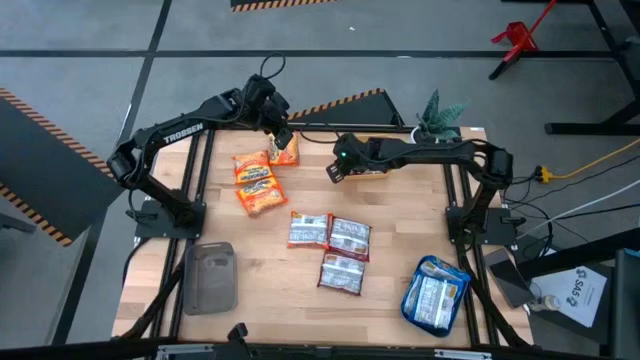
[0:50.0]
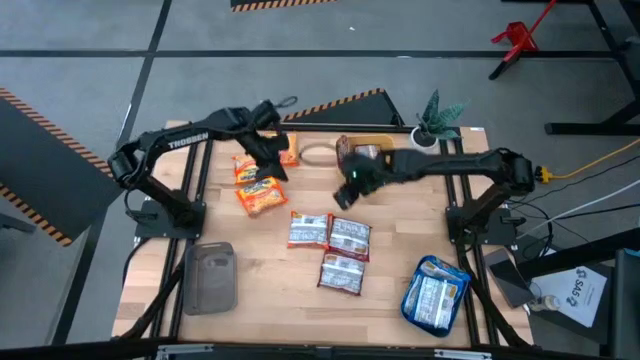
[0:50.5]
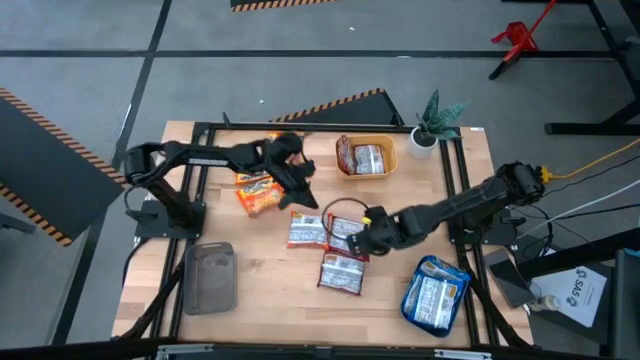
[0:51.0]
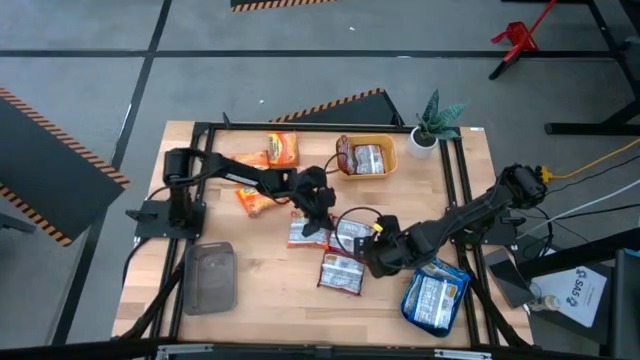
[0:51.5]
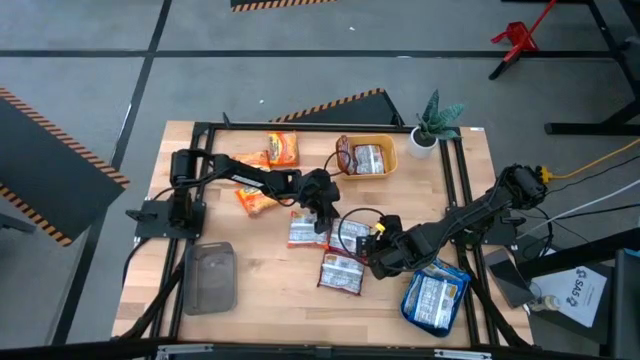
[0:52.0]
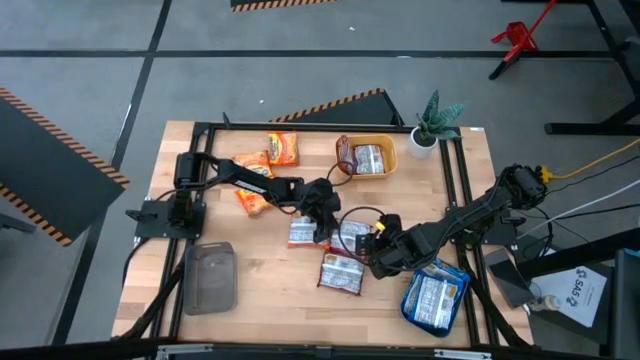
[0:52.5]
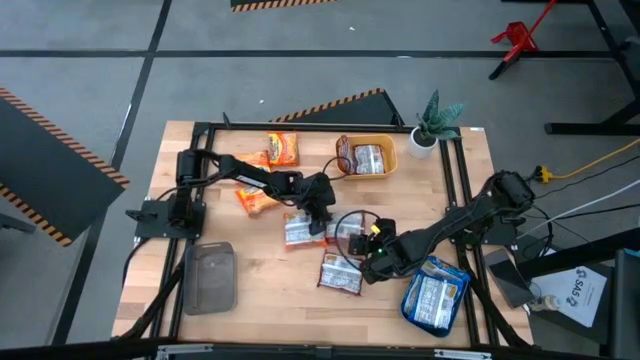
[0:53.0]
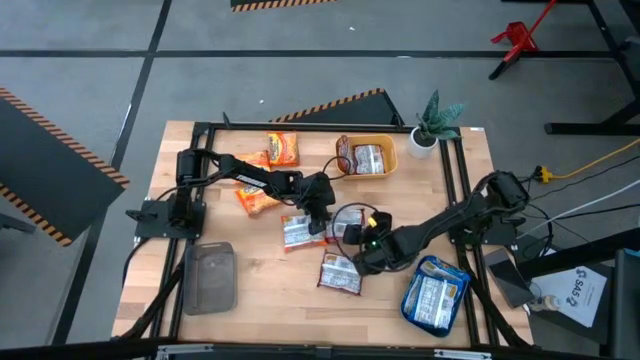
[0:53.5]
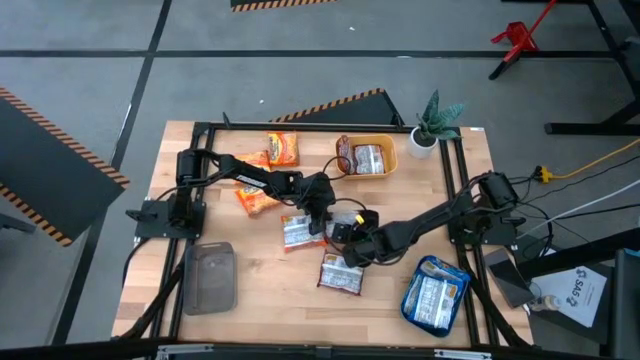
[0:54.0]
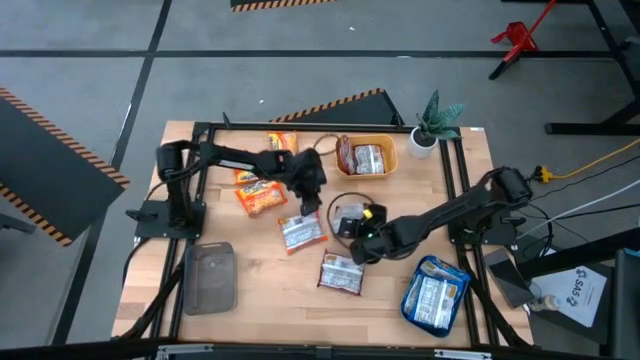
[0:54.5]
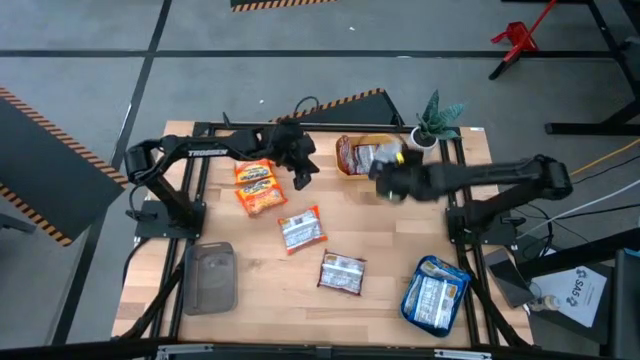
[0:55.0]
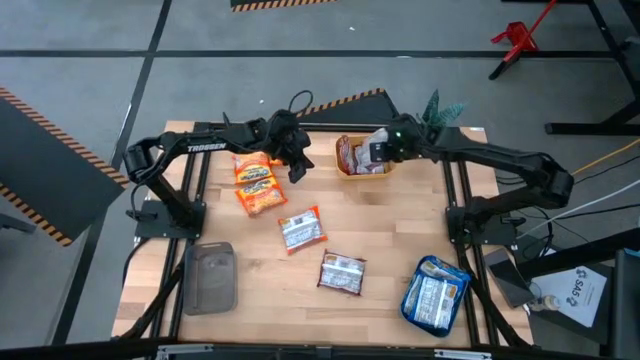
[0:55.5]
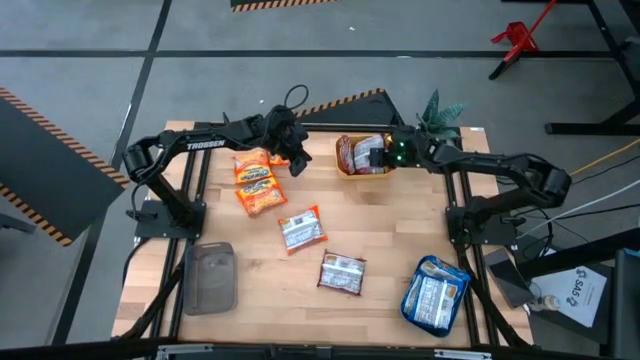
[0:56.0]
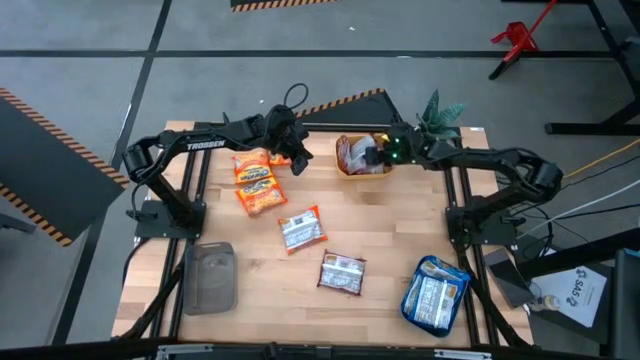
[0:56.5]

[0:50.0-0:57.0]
Task: Sort Maruchan noodles
Put the red noodle pack into the yellow bin

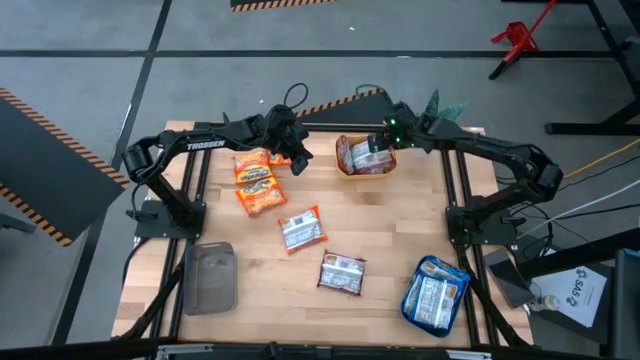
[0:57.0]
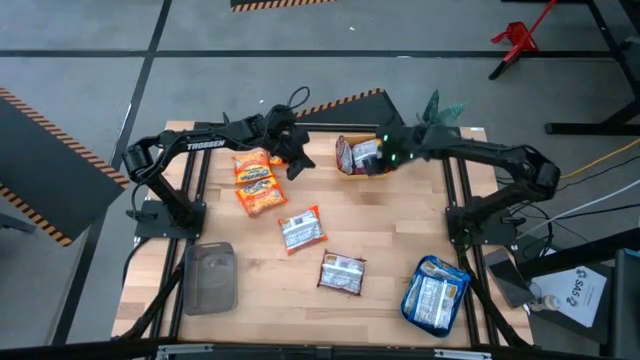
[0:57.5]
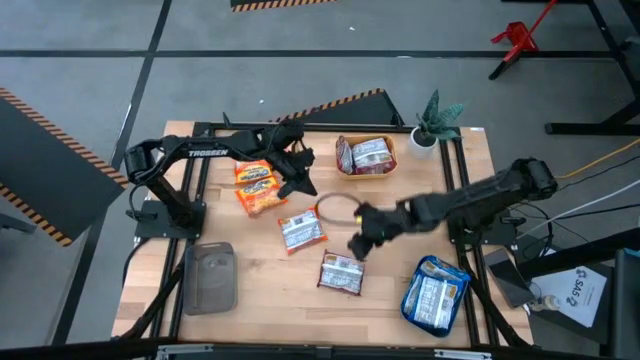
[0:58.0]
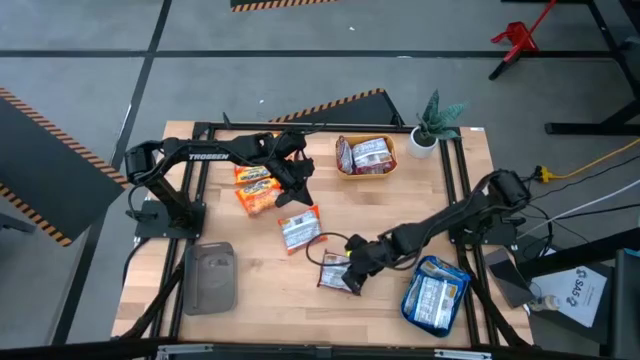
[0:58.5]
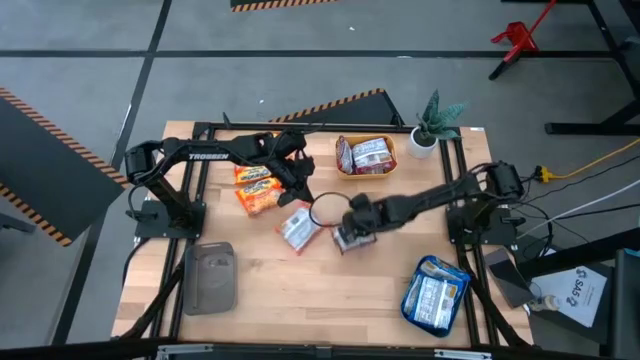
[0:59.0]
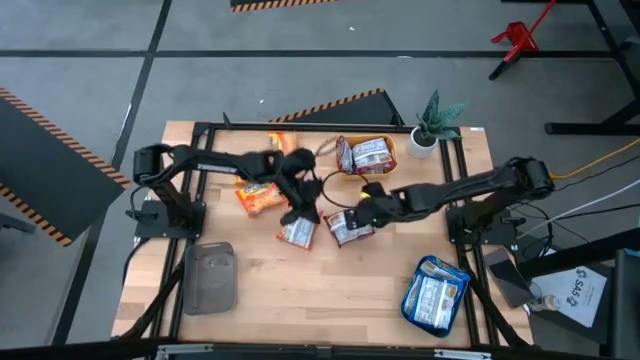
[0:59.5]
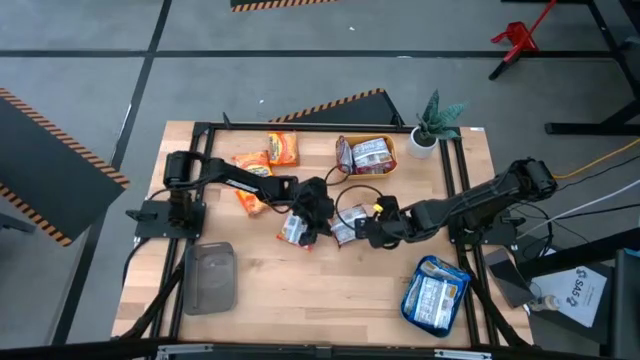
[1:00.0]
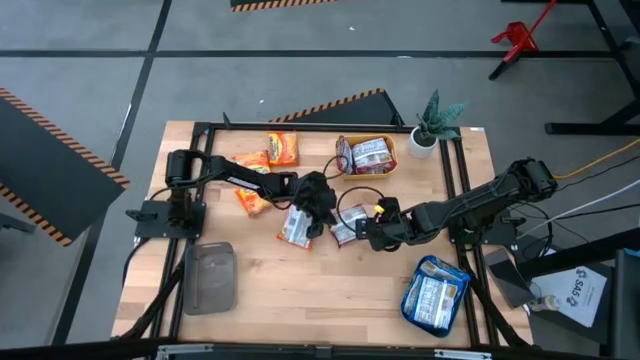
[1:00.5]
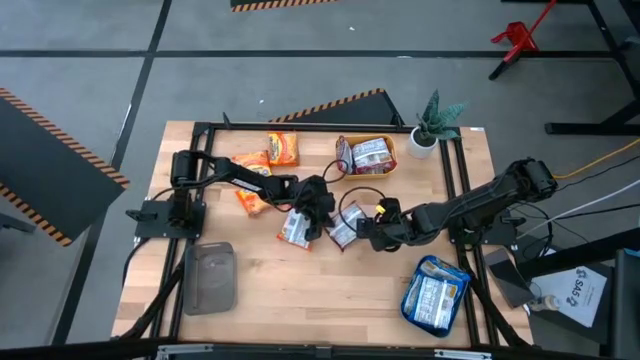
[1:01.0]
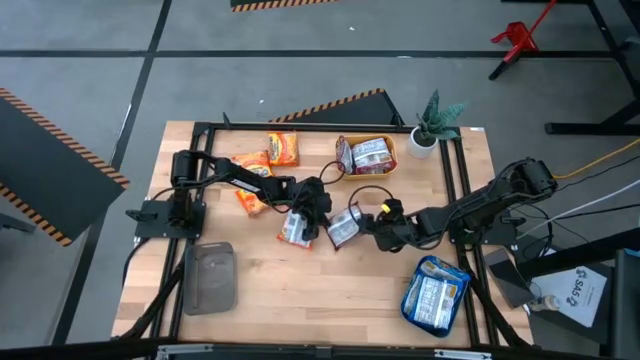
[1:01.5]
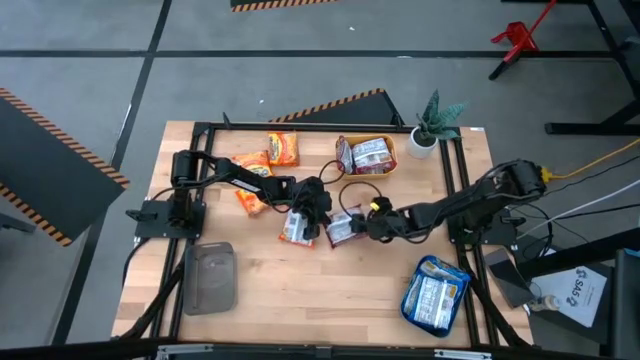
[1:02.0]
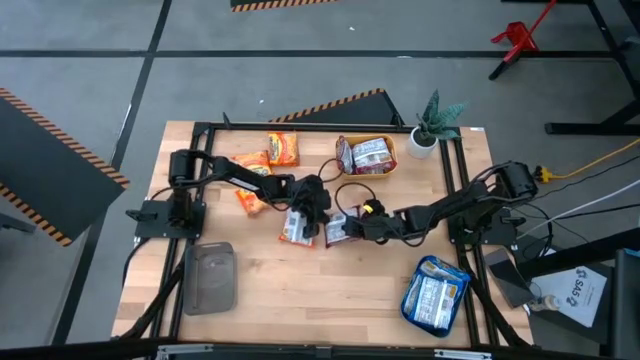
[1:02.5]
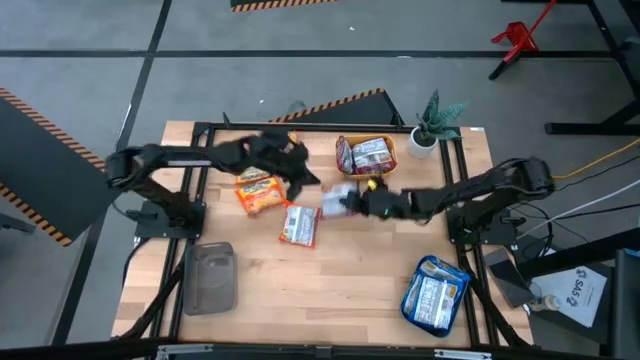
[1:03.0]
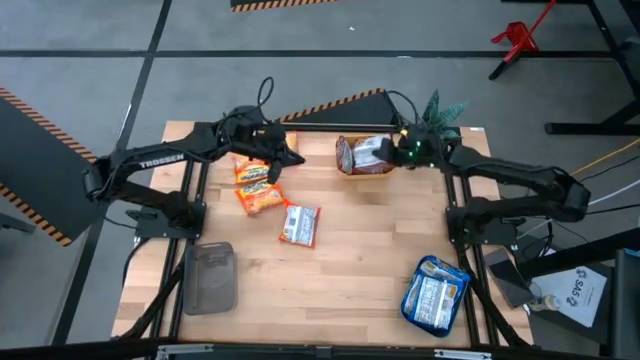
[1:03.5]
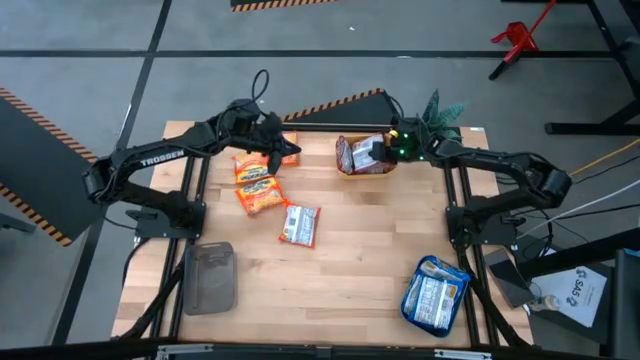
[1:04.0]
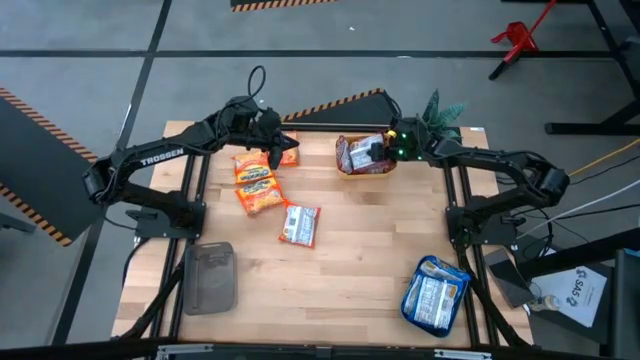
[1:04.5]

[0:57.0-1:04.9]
Put the red noodle pack into the yellow bin

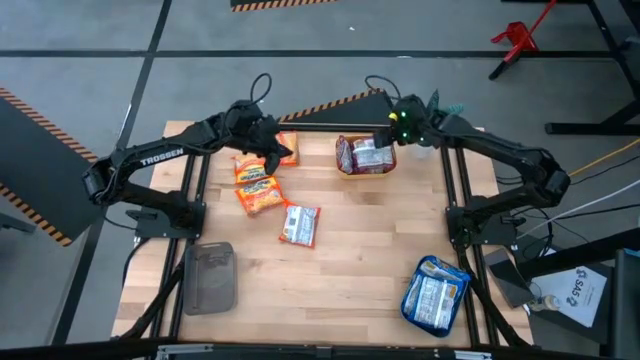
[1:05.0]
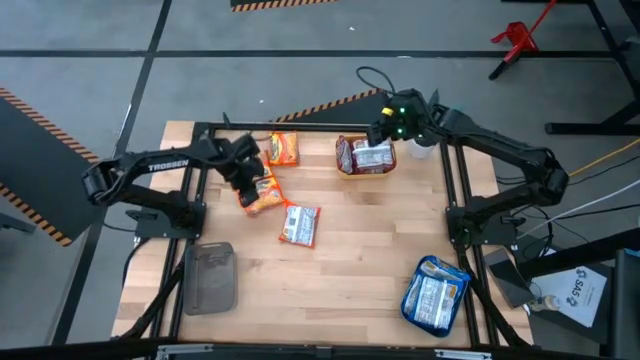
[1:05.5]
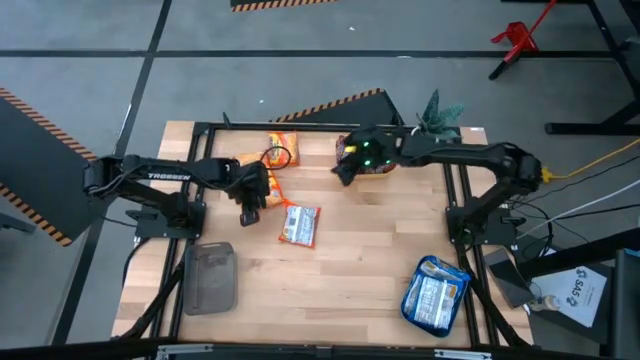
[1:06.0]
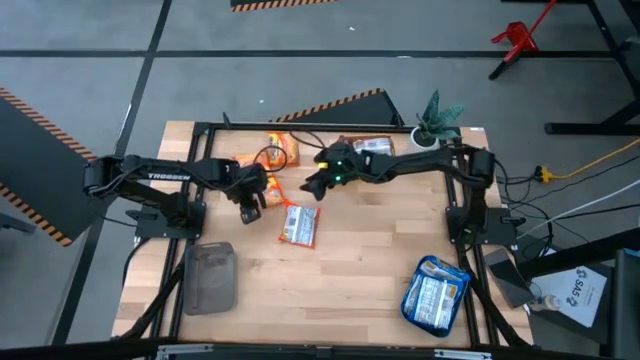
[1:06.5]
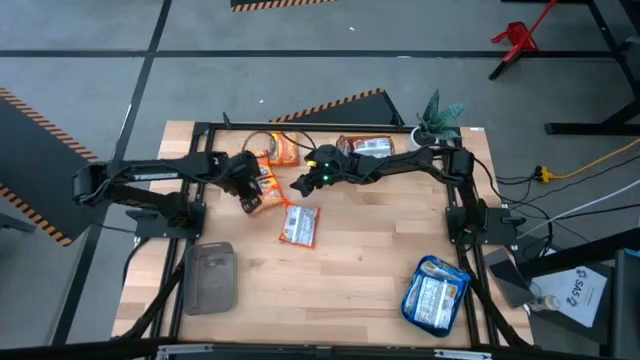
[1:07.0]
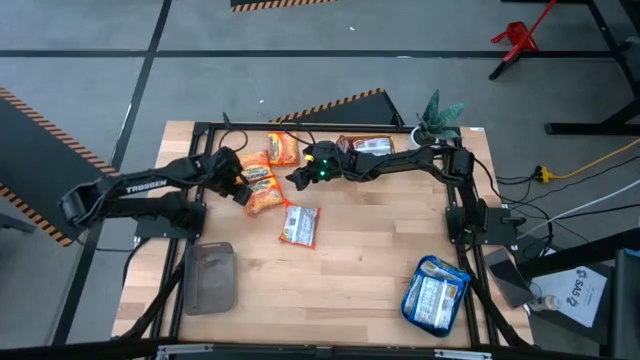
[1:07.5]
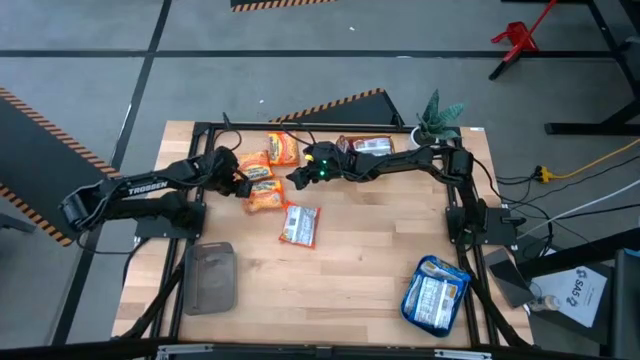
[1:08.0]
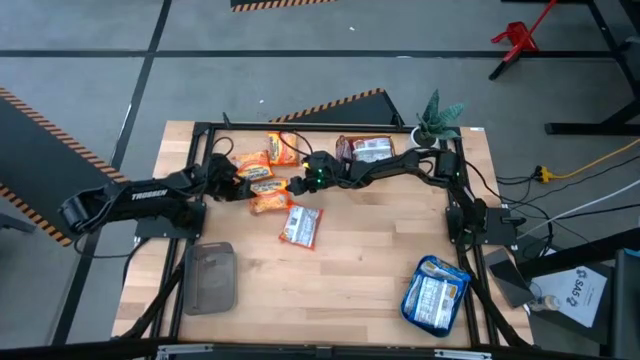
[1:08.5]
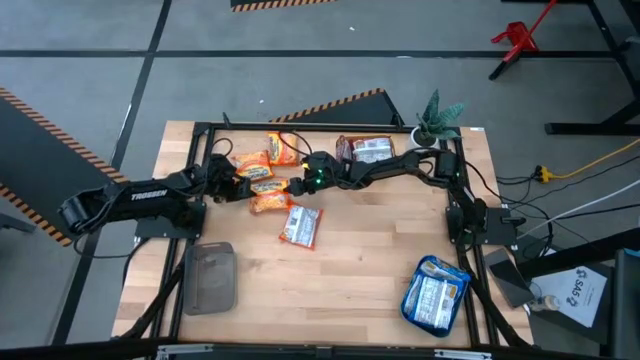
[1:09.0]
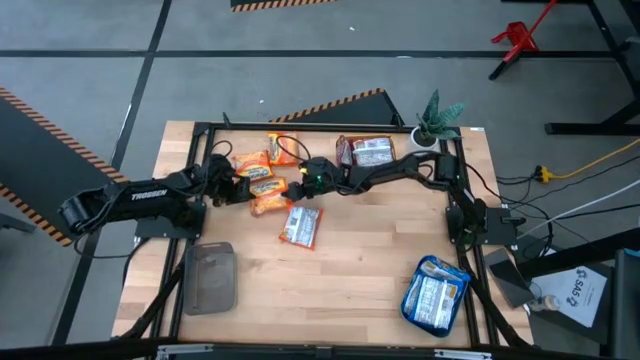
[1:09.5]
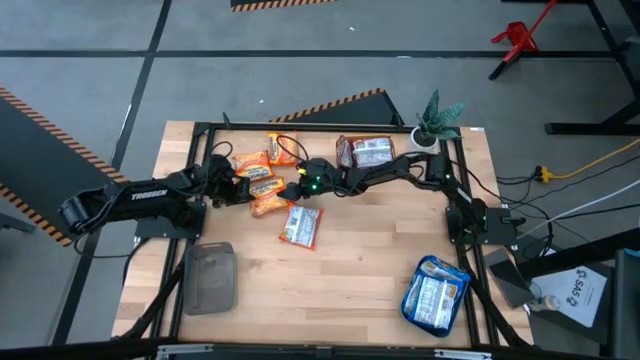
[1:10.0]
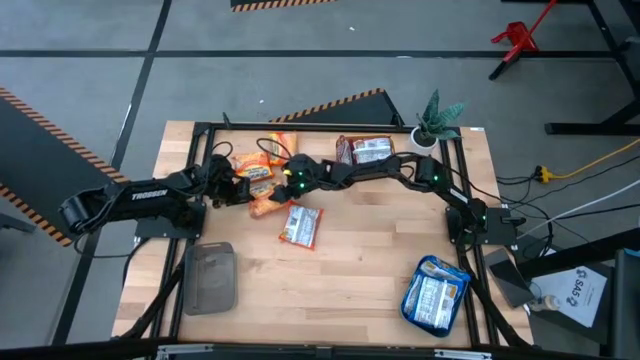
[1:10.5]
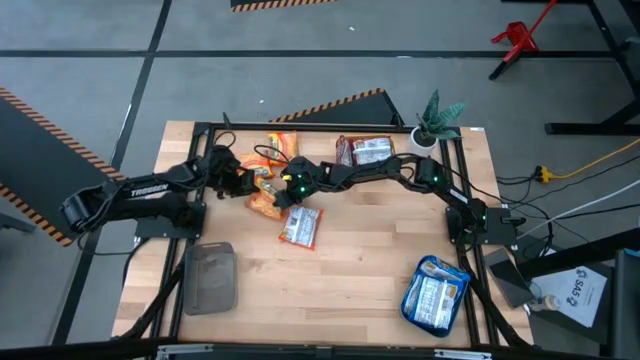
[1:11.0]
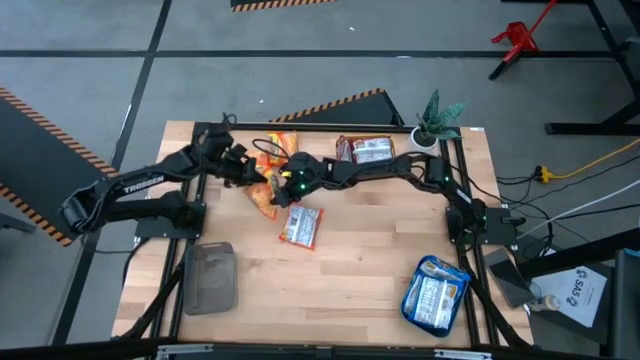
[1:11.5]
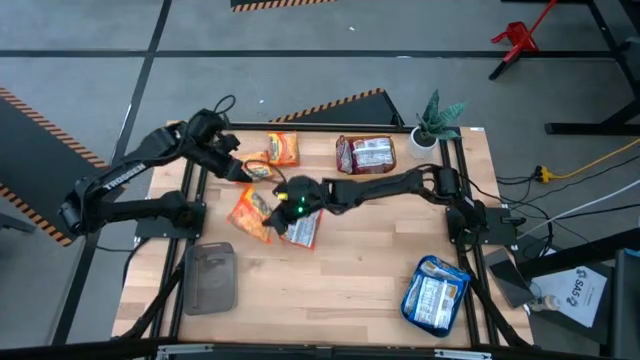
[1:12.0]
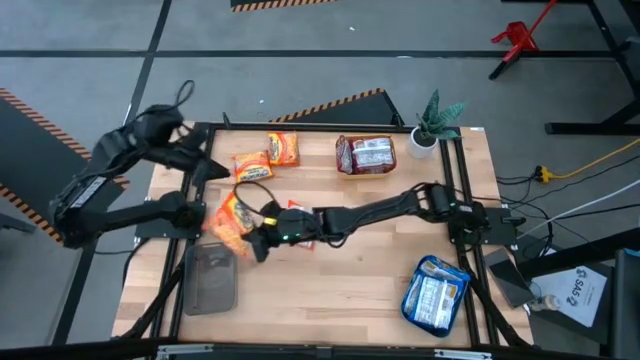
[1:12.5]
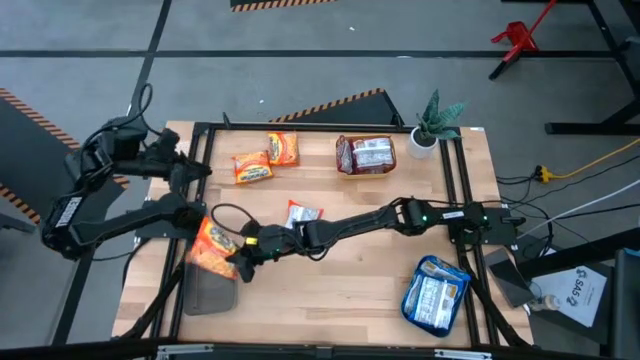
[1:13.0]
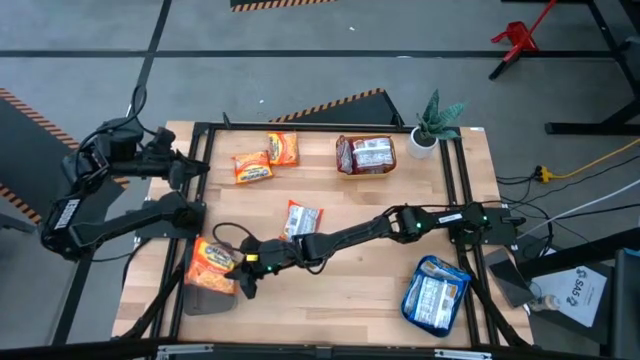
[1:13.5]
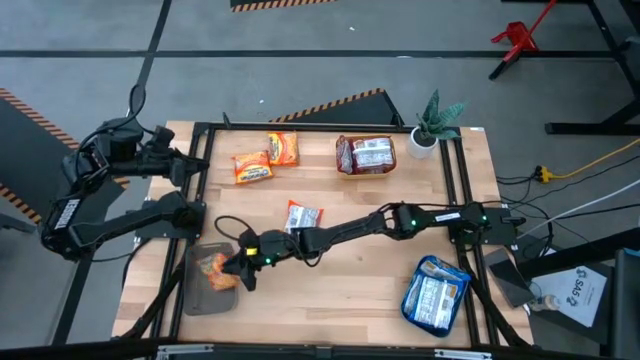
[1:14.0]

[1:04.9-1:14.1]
Put the orange noodle pack into the black bin
